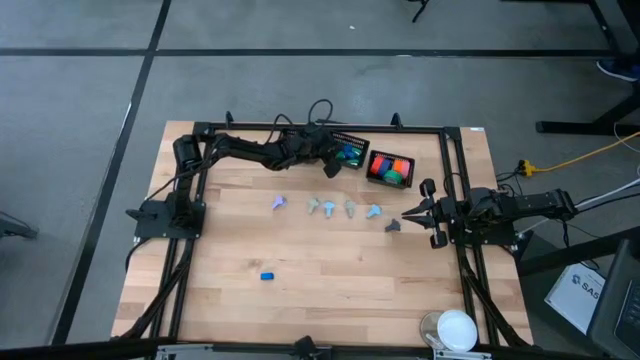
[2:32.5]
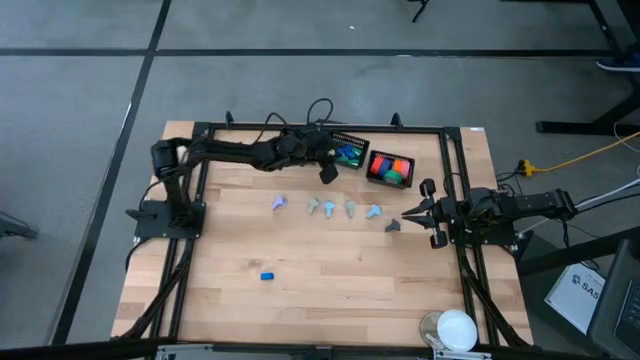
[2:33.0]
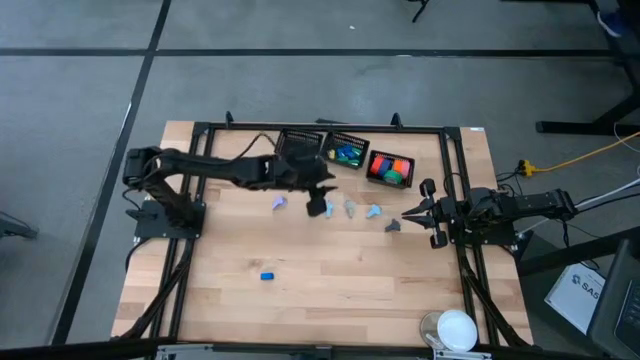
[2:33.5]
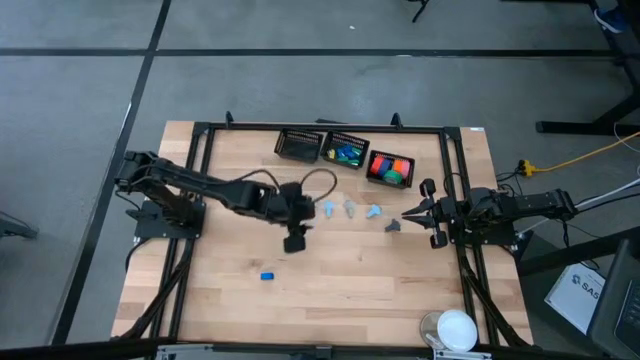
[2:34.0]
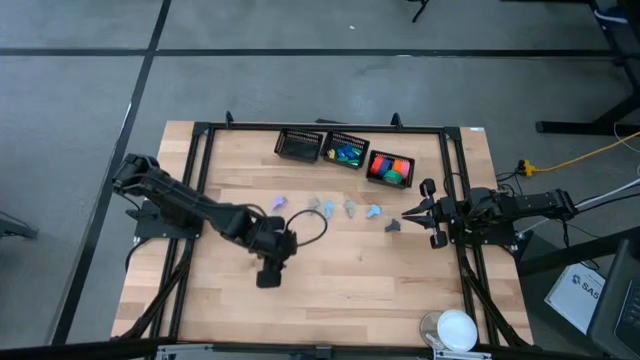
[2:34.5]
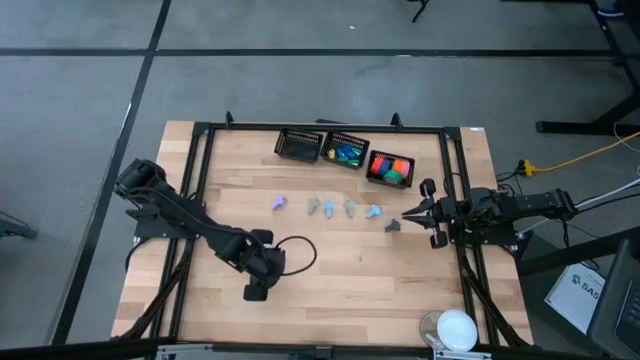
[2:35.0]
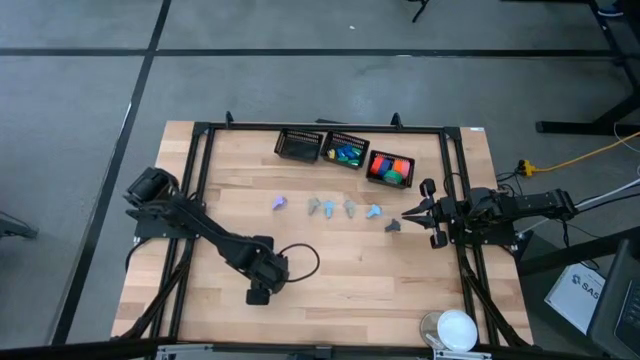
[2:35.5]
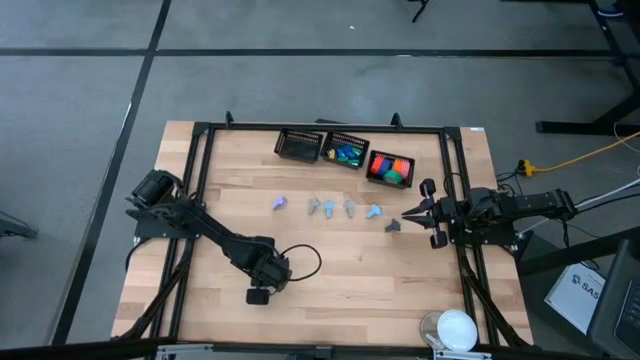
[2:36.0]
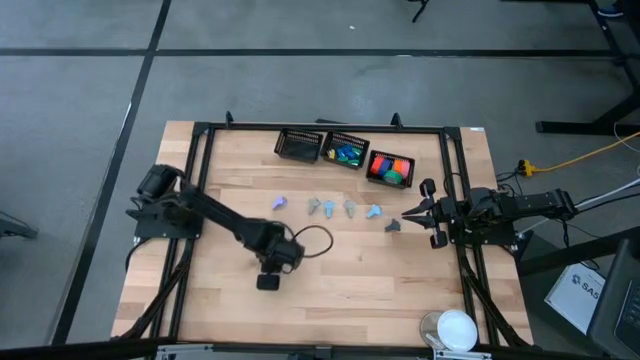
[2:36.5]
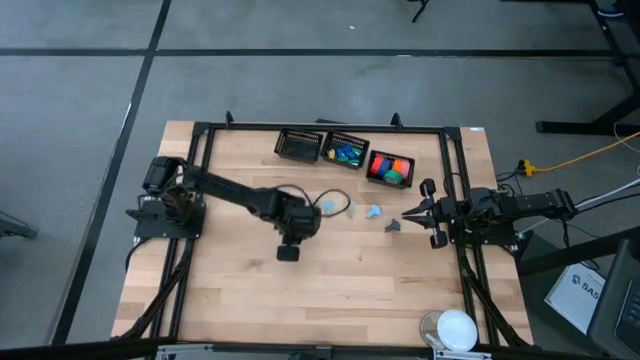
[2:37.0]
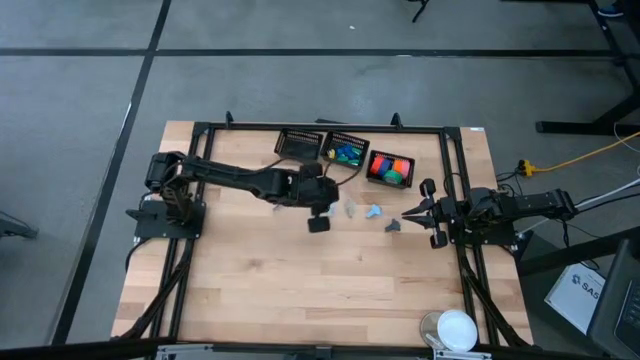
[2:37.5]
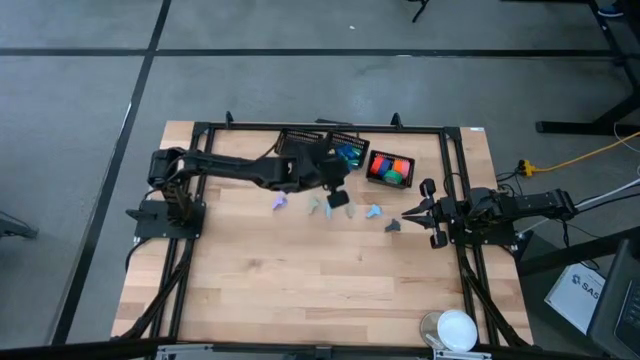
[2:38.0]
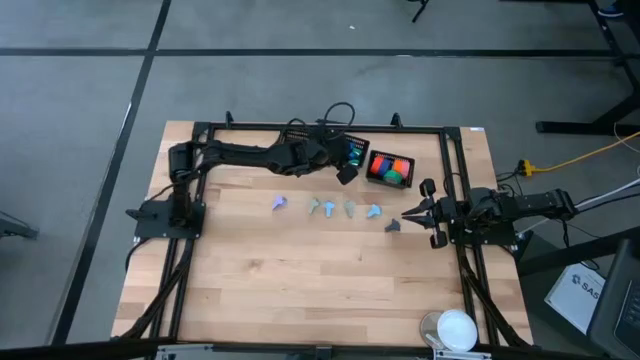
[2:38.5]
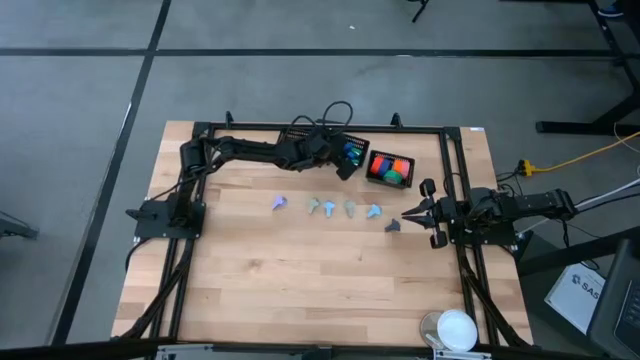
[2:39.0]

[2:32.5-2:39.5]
Task: Pick and place Stapler, Stapler remover, tape
Put the blue stapler into the middle black bin

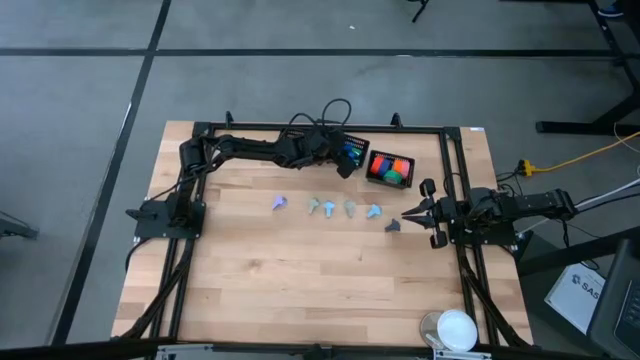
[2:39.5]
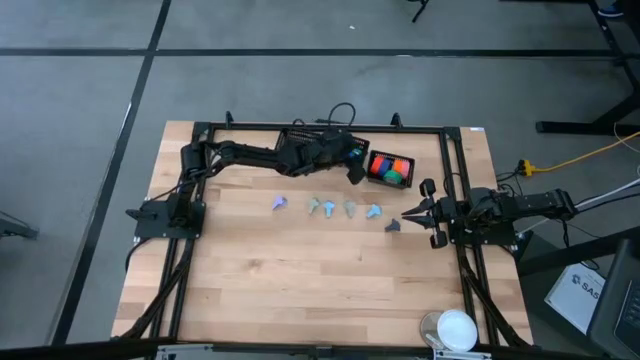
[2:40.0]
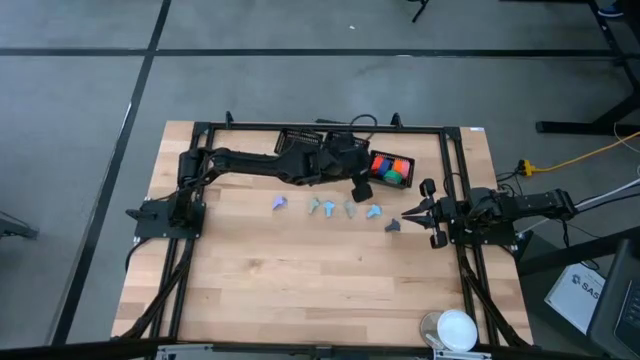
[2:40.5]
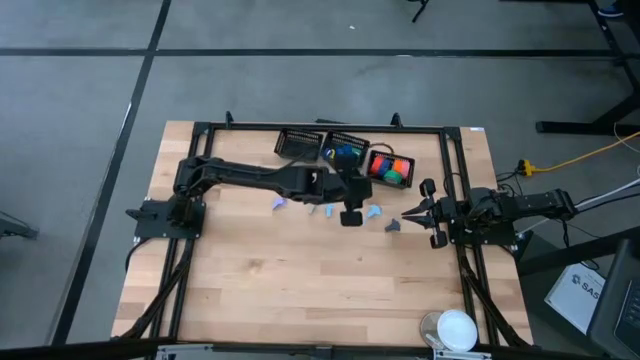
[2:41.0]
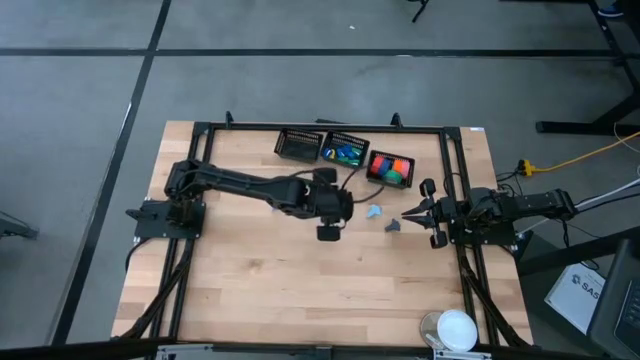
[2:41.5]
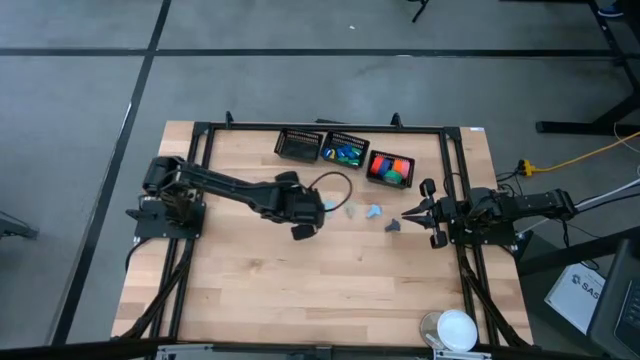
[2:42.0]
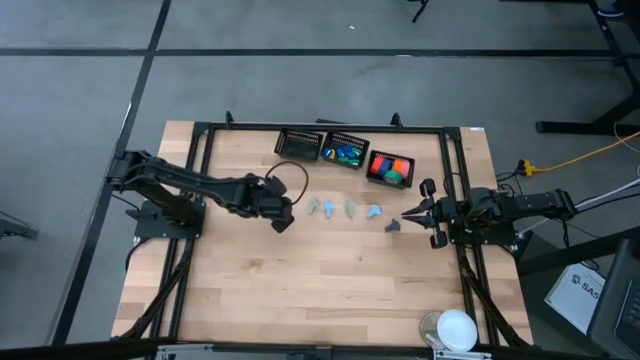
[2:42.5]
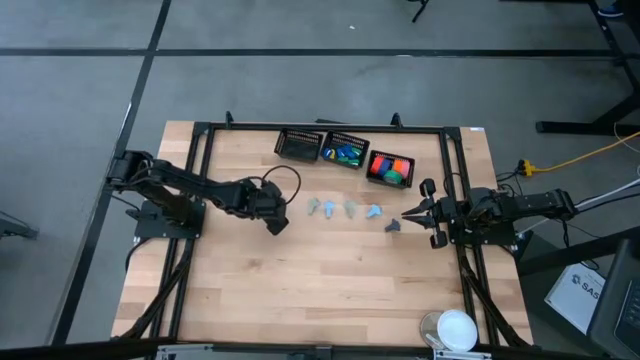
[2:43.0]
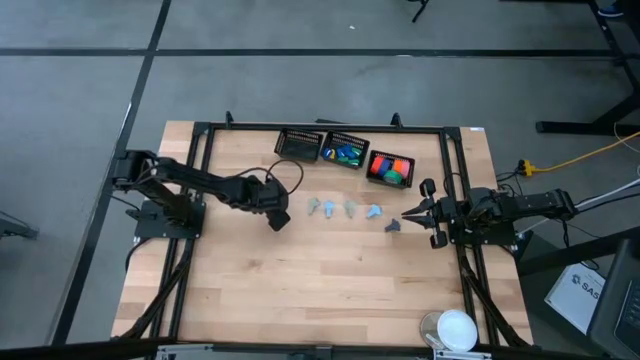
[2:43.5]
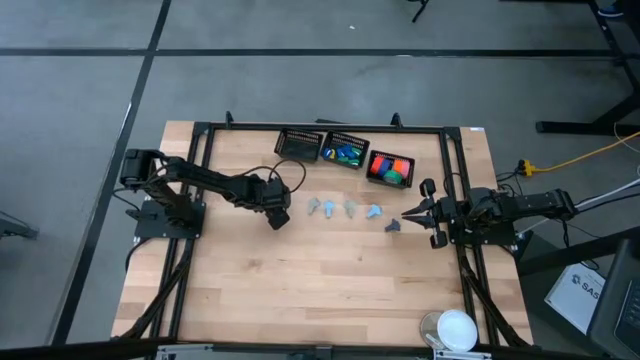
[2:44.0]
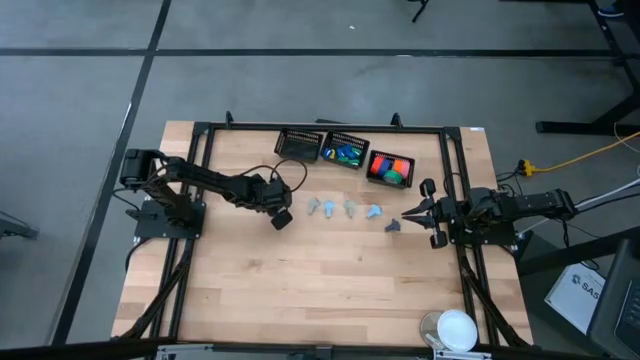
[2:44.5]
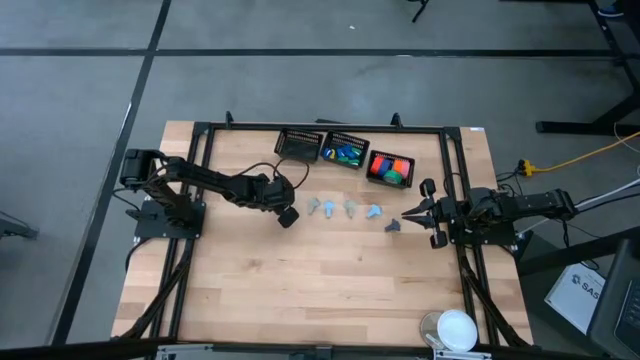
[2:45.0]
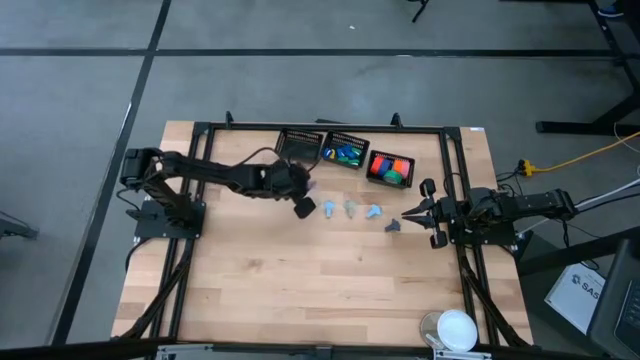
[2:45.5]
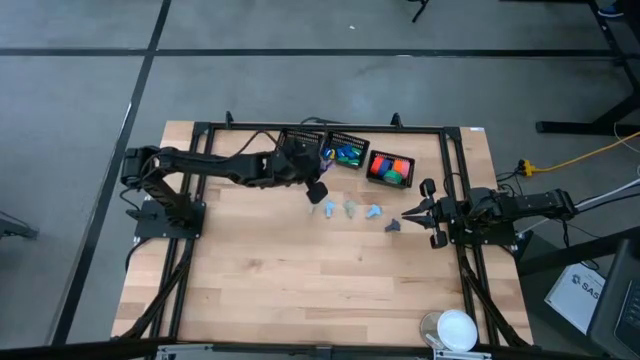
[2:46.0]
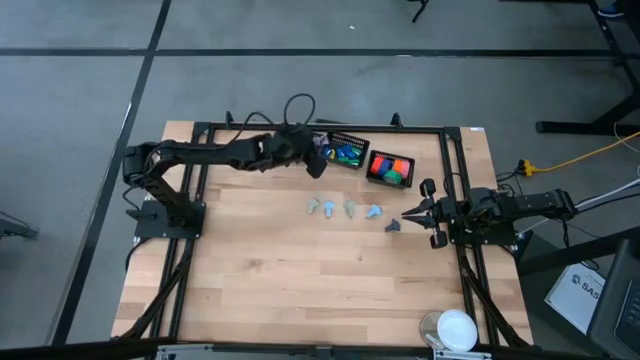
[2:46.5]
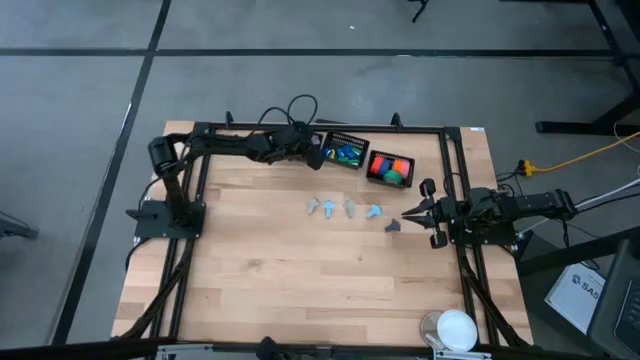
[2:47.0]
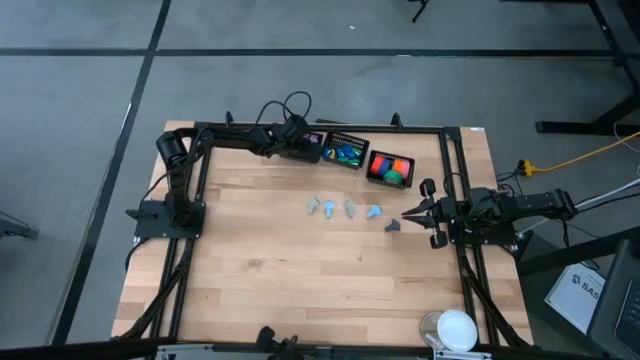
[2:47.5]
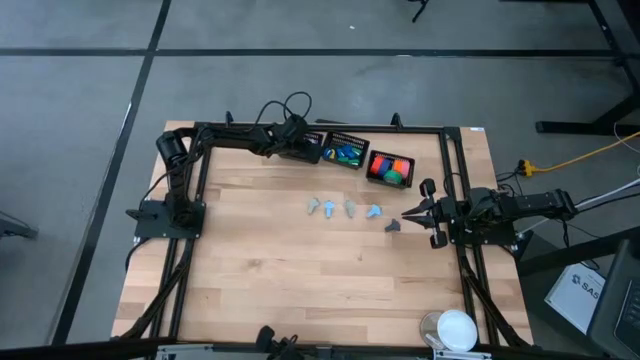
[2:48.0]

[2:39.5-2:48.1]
Put the purple stapler remover into the left black bin

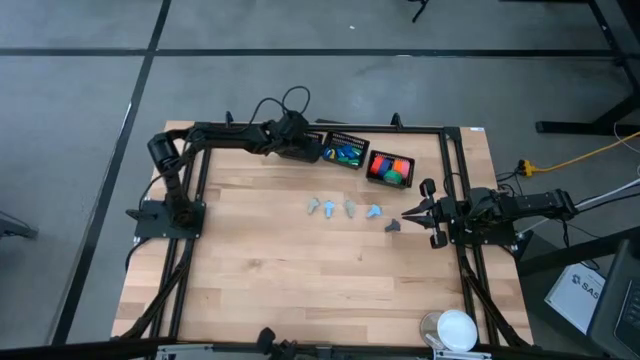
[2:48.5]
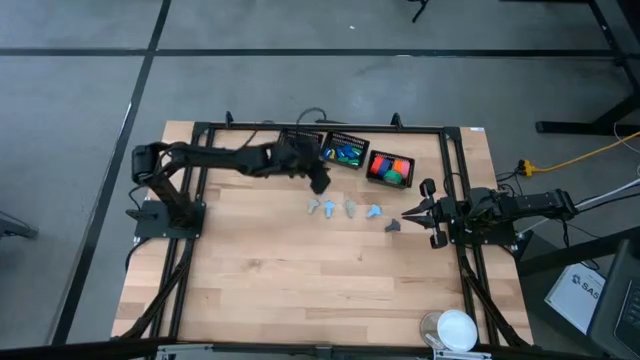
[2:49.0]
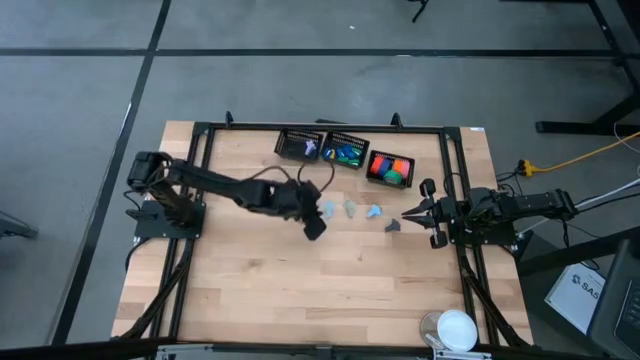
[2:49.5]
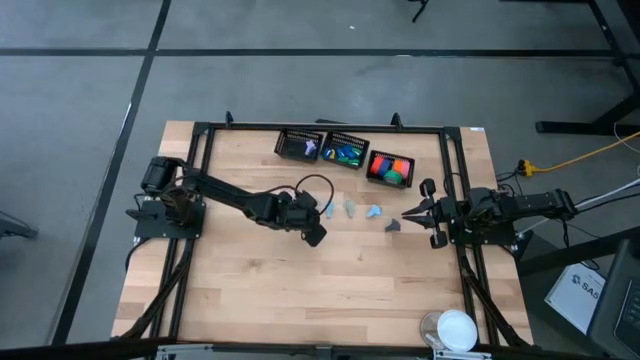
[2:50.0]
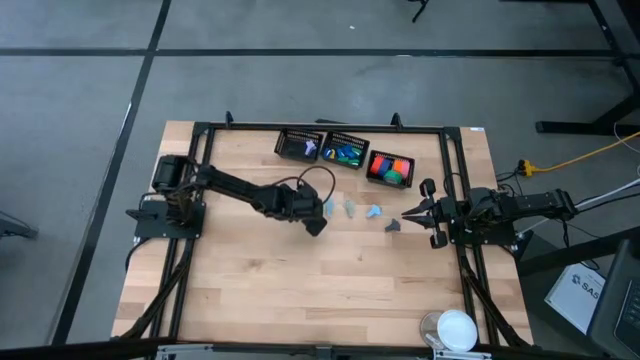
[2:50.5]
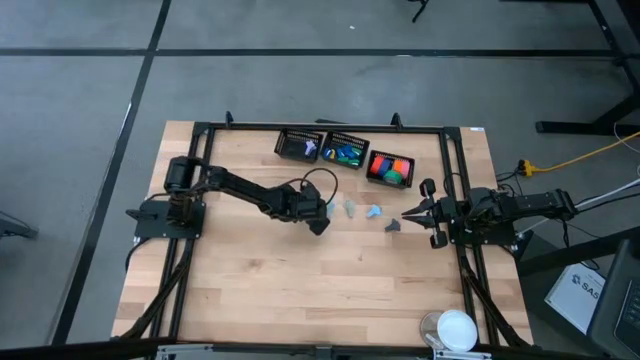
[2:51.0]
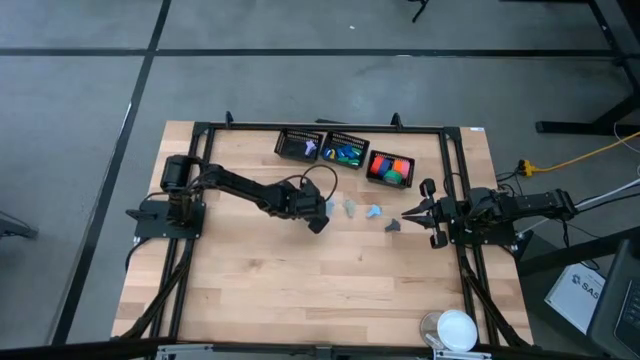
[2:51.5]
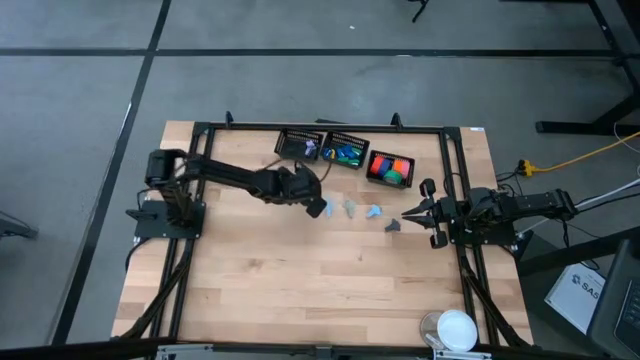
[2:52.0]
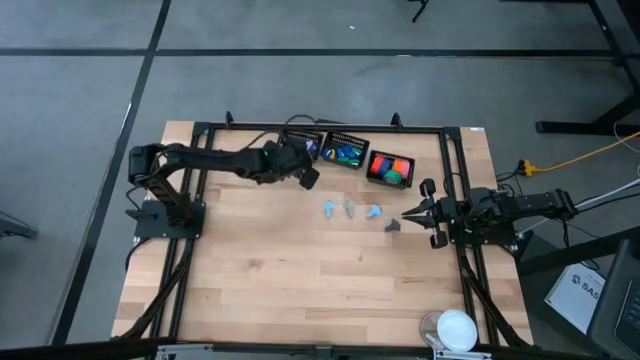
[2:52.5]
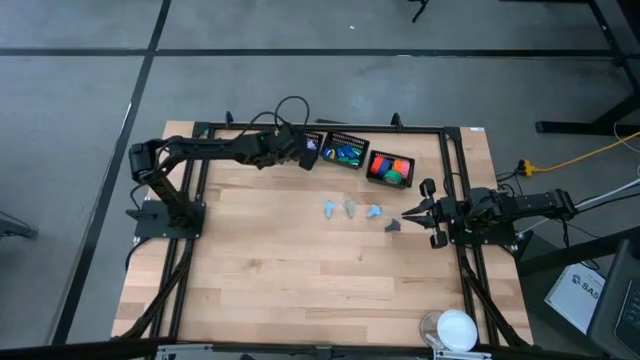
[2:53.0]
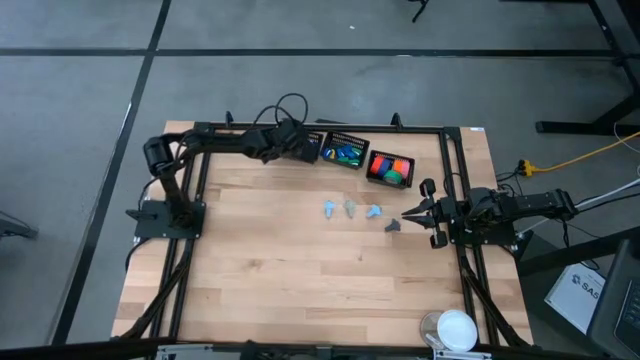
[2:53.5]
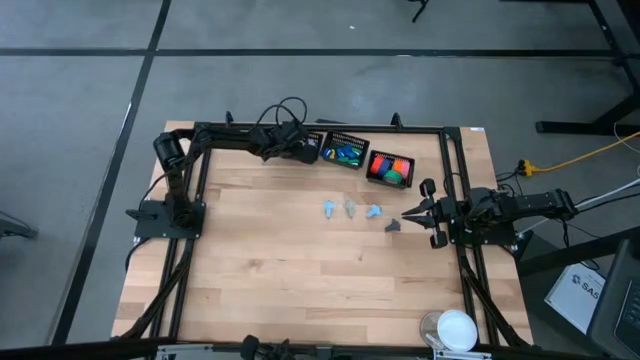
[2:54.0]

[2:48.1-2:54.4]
Put the gray stapler remover into the left black bin

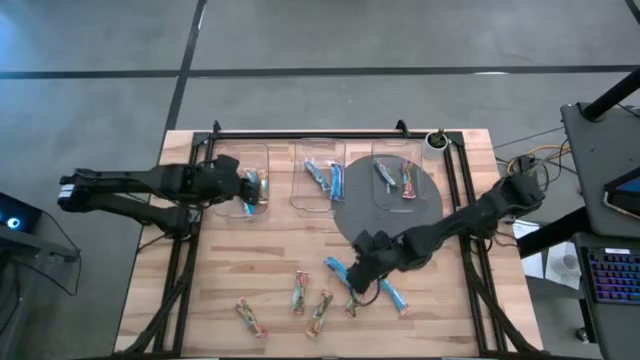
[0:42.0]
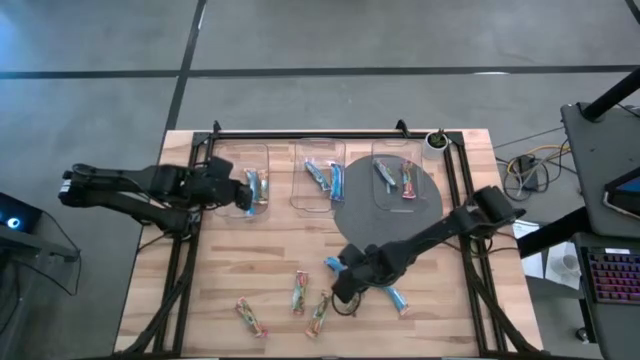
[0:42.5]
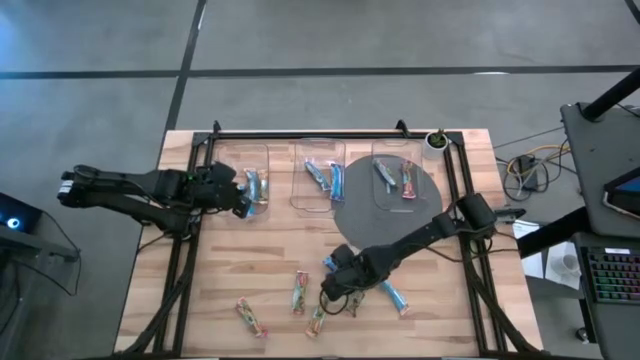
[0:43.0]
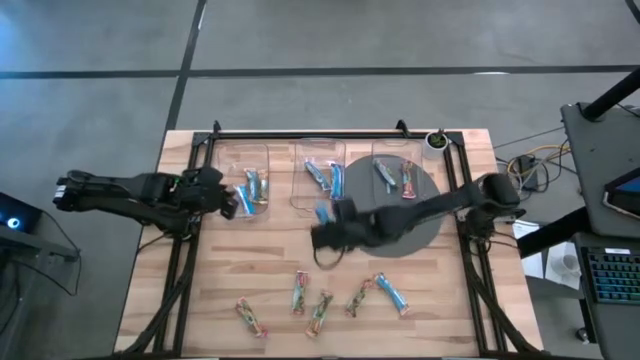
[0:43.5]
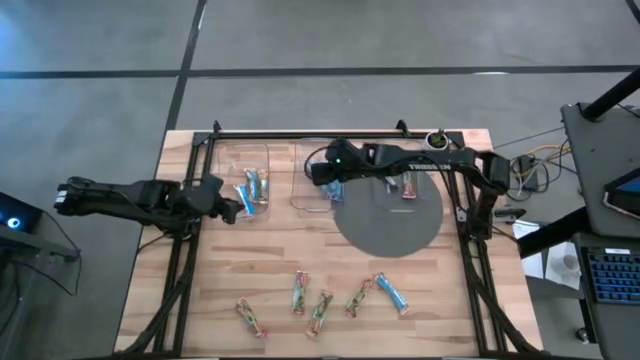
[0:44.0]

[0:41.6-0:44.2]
Task: Pick and place Granola Bars by type
Put the blue granola bar into the middle transparent container
